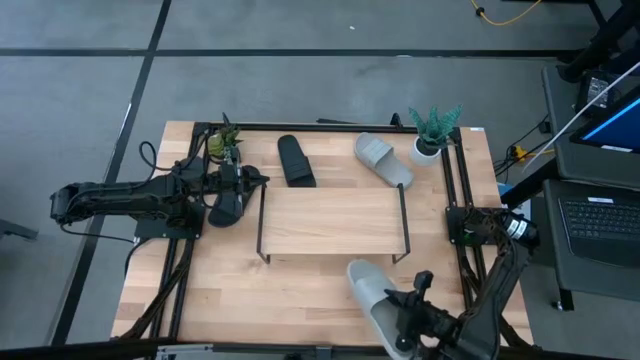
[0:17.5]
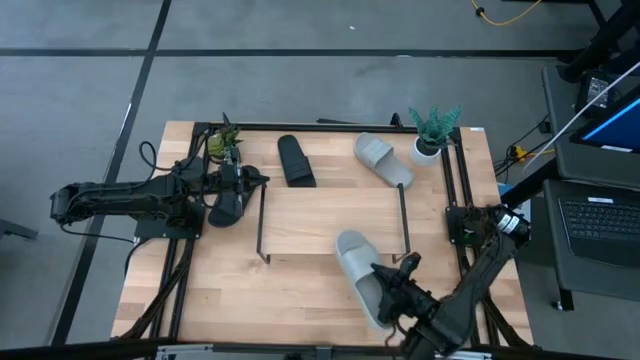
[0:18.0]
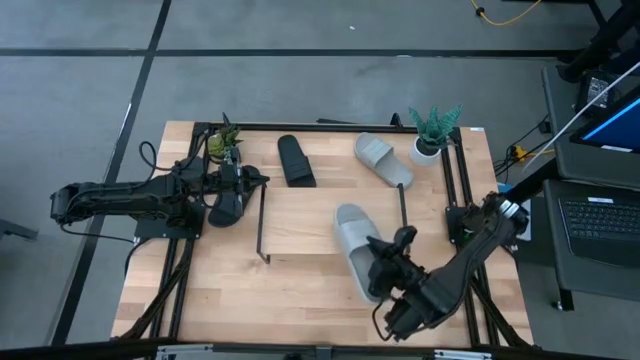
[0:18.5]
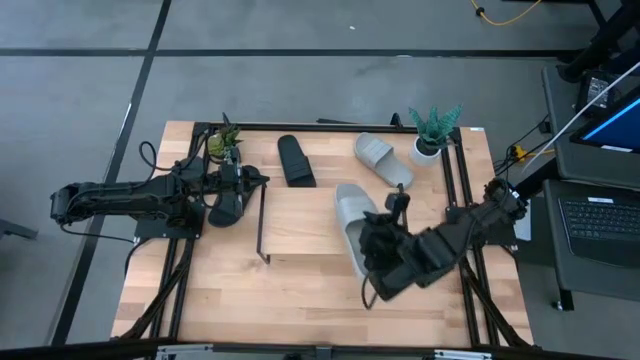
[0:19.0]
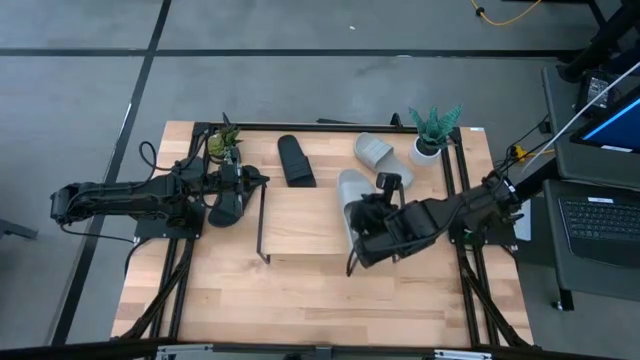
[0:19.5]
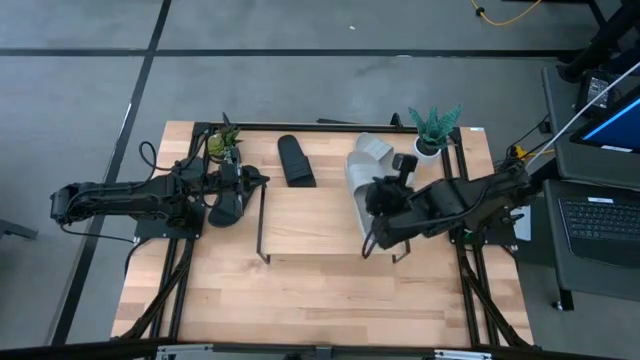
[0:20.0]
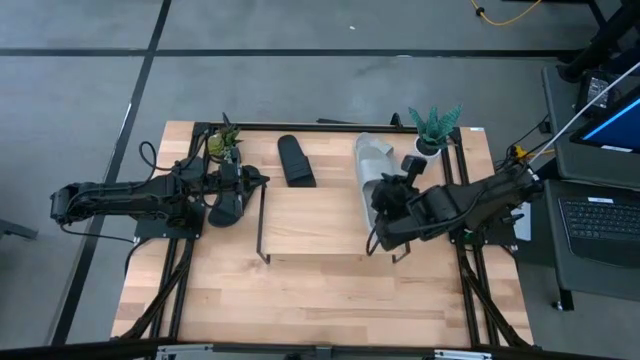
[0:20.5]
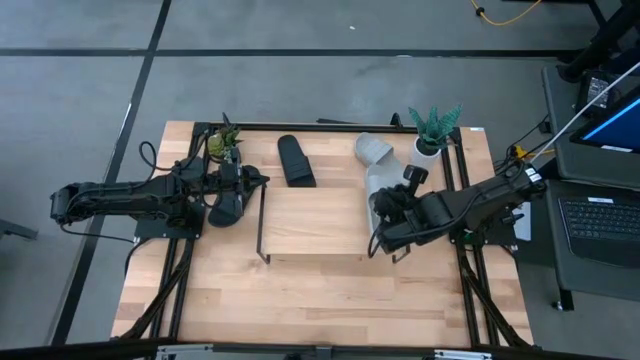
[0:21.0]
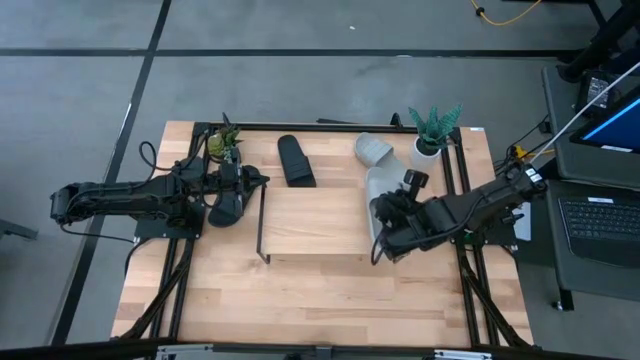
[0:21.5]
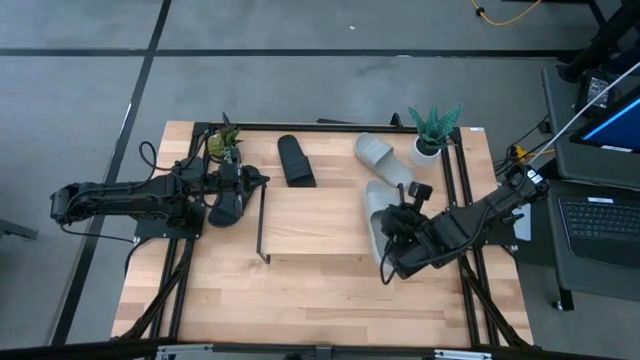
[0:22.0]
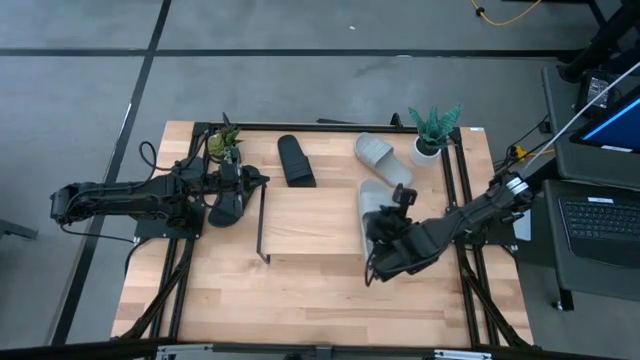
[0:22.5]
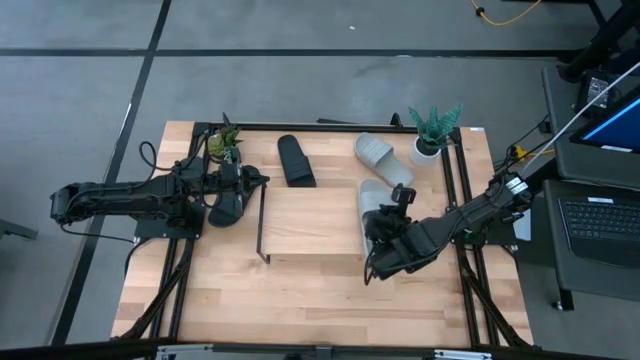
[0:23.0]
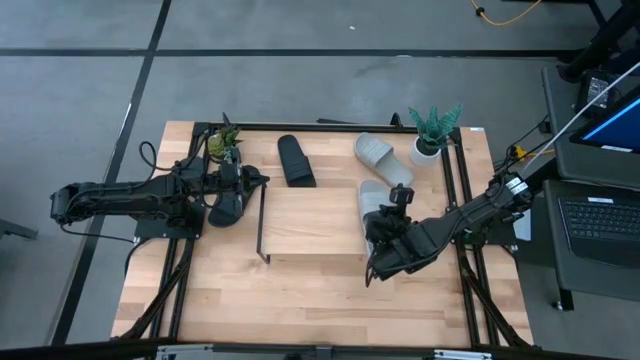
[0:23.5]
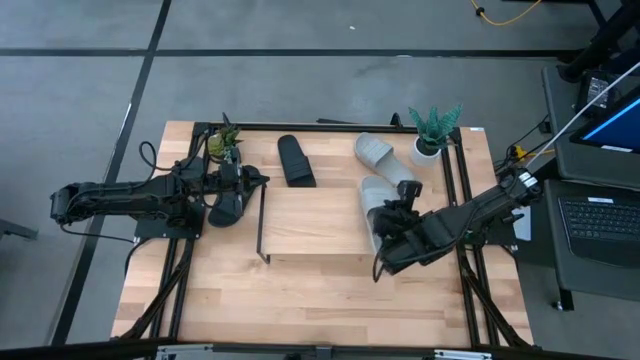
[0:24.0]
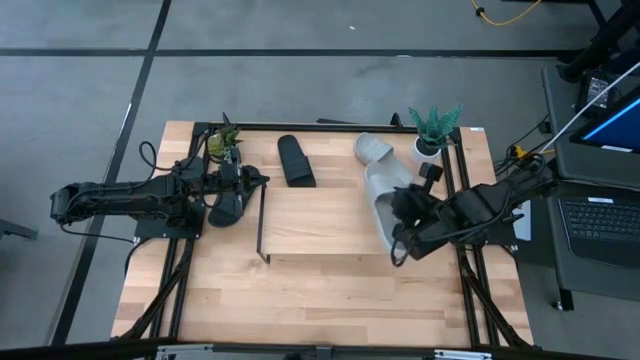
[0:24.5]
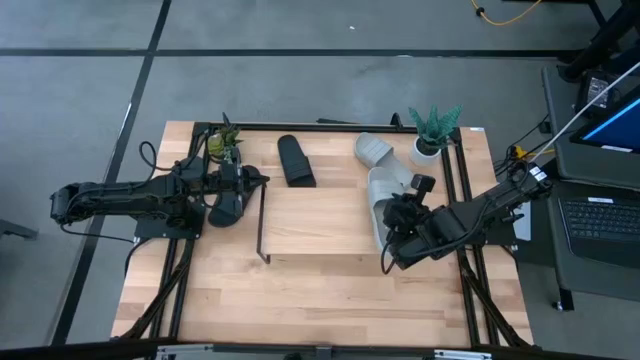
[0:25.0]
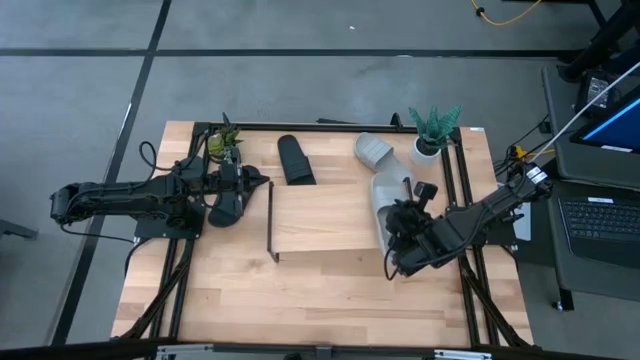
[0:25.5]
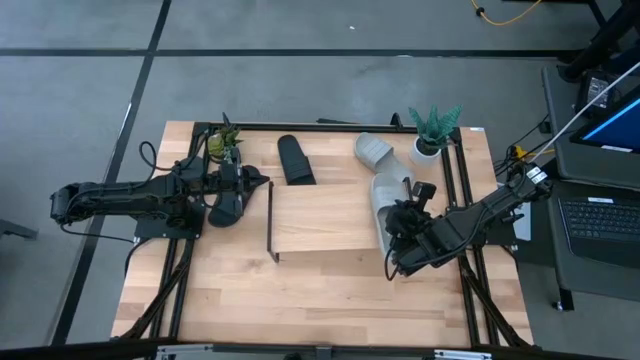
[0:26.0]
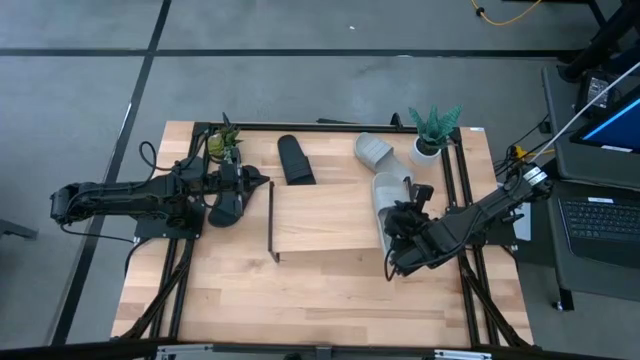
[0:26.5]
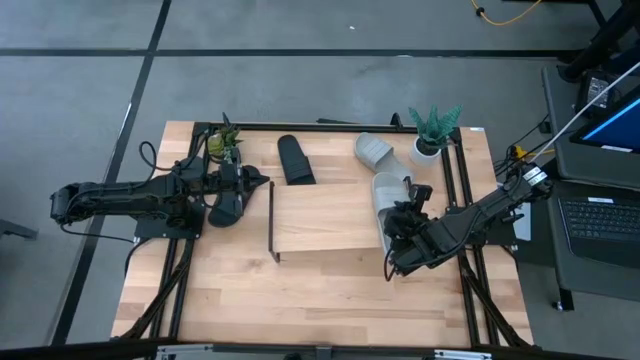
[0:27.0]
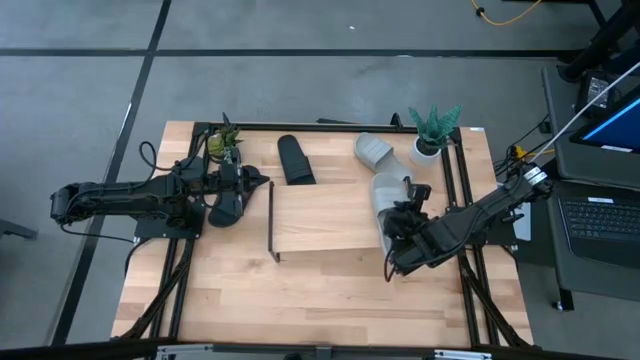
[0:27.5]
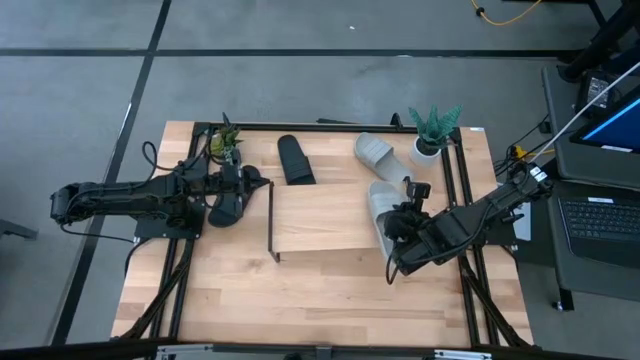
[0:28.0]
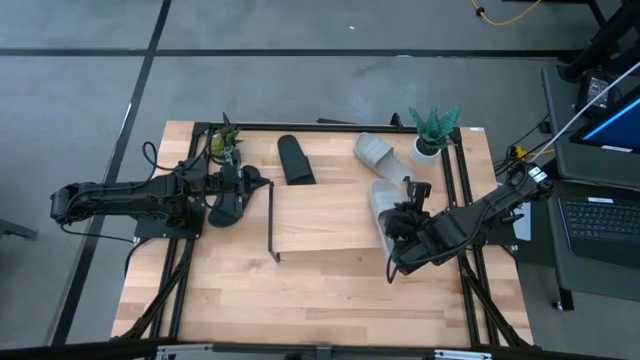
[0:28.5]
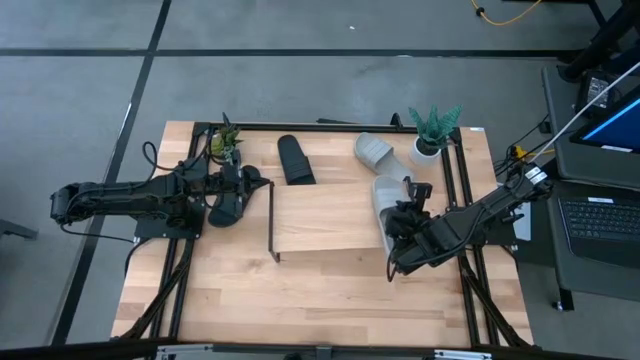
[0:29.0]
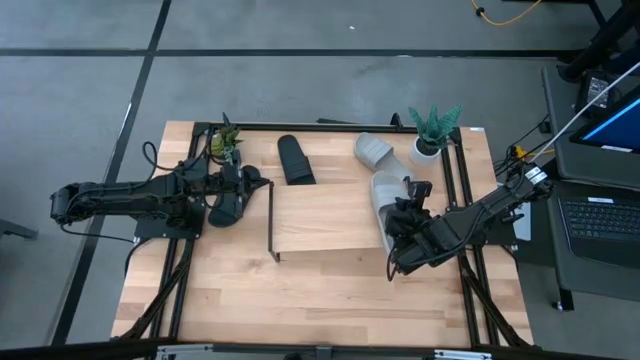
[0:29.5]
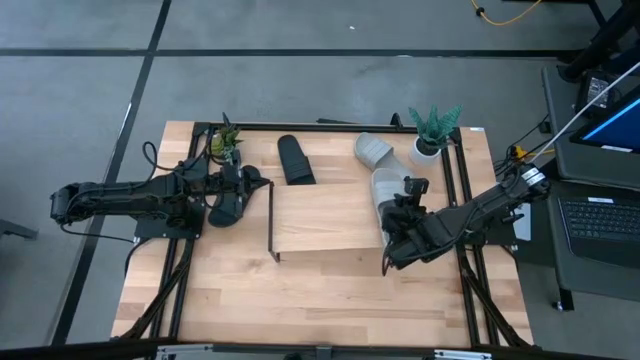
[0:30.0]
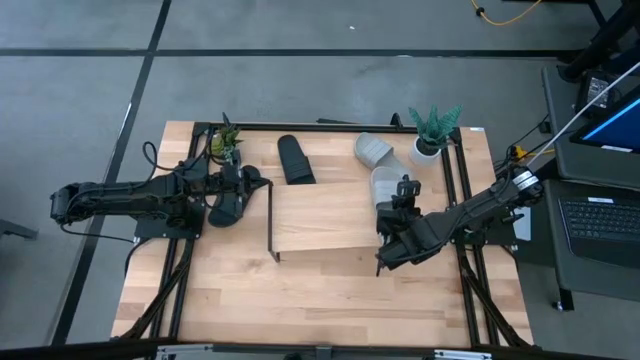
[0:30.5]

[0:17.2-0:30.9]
Task: Pick and place slides into the shelf
Put the bottom gray slide on the shelf

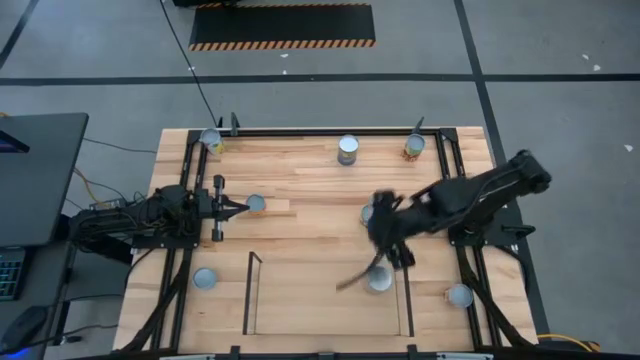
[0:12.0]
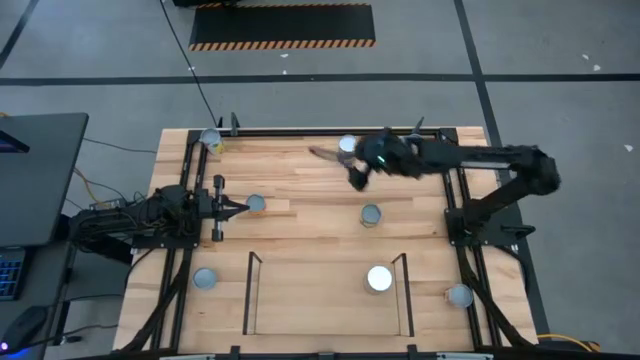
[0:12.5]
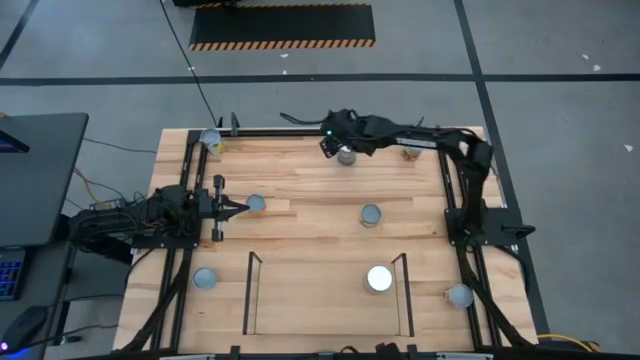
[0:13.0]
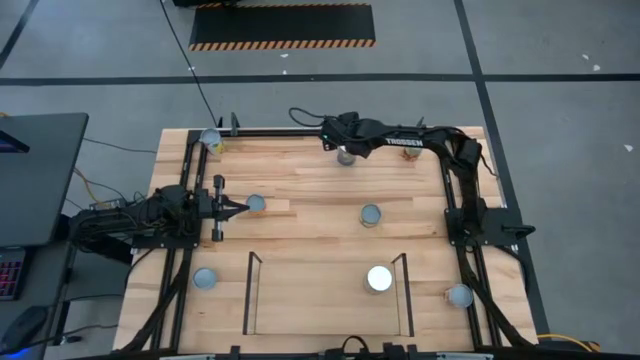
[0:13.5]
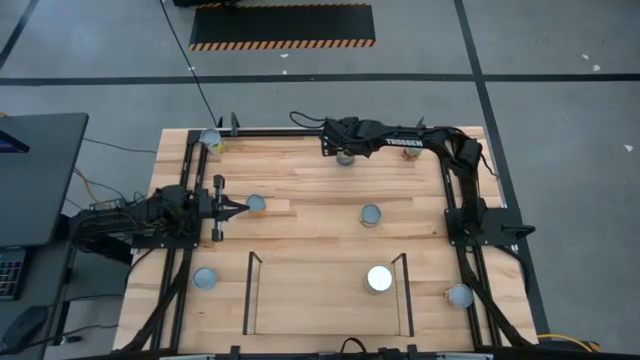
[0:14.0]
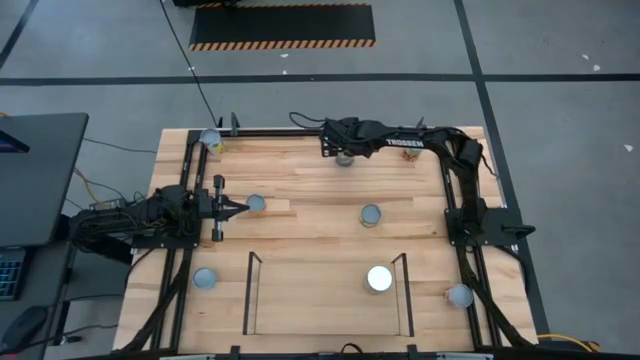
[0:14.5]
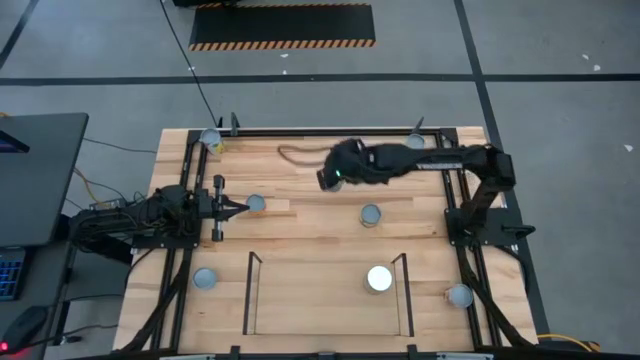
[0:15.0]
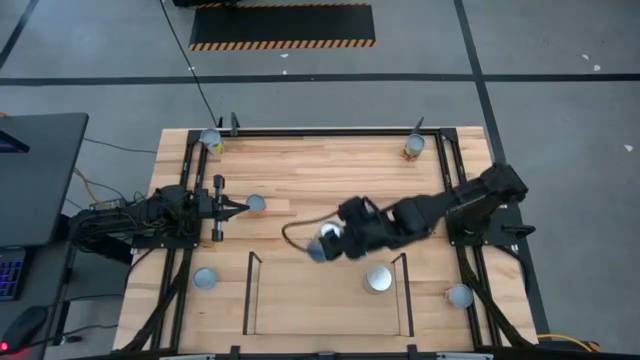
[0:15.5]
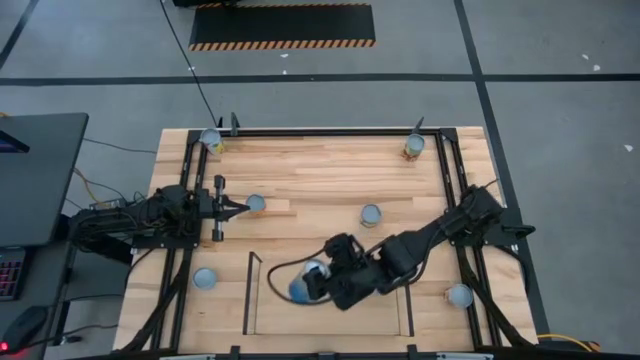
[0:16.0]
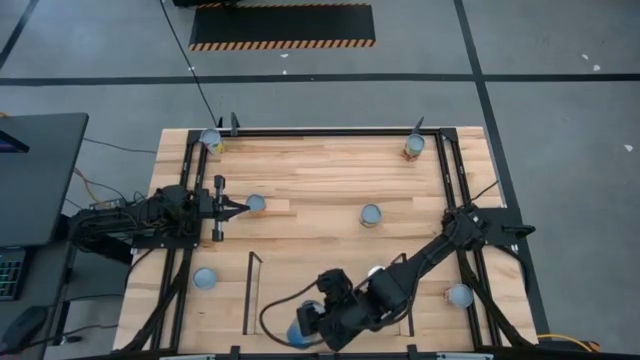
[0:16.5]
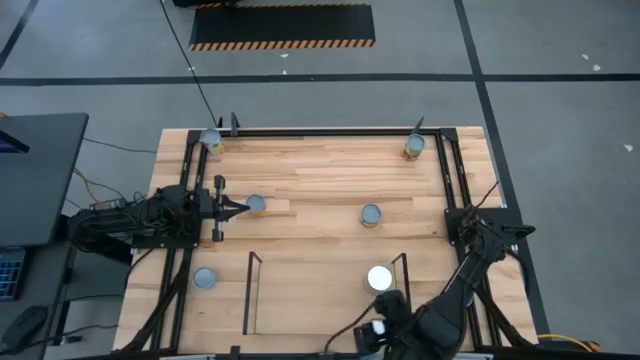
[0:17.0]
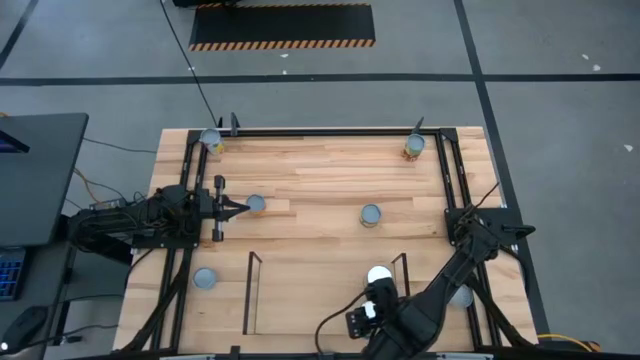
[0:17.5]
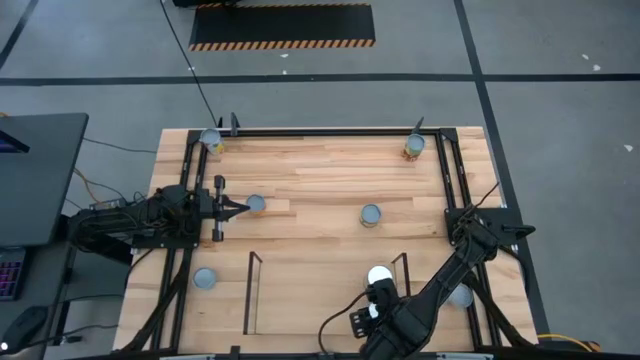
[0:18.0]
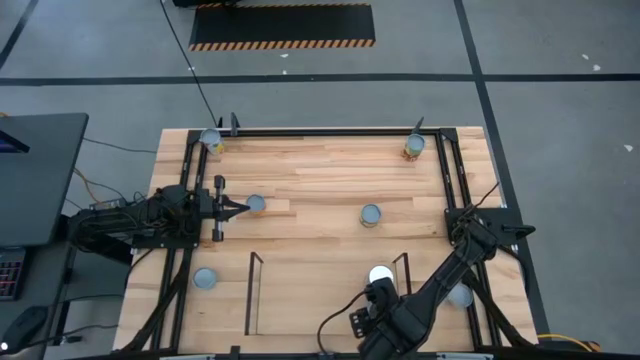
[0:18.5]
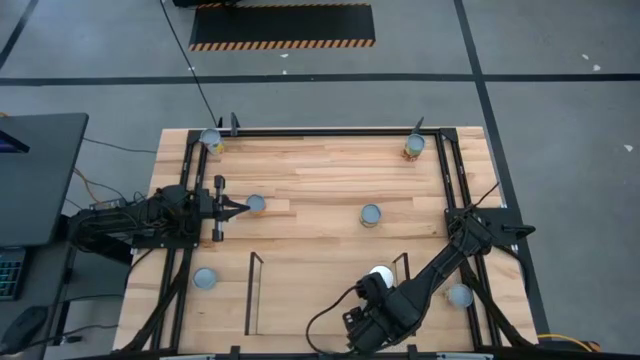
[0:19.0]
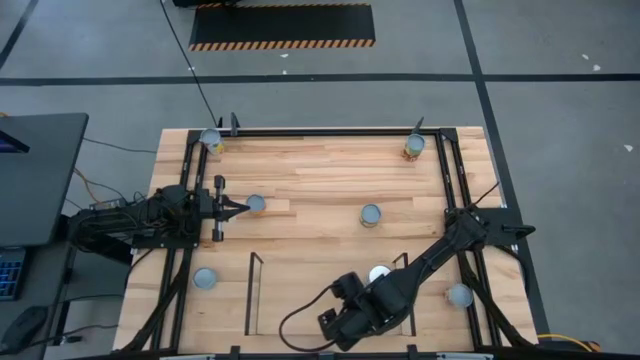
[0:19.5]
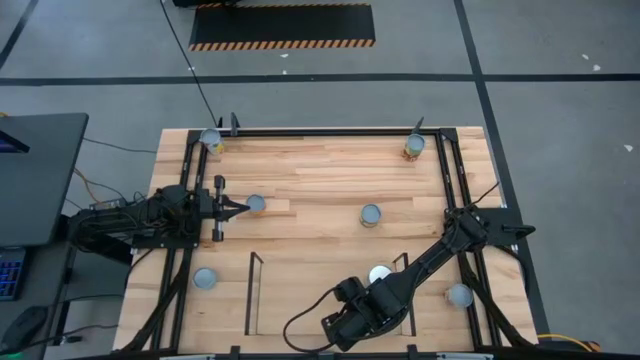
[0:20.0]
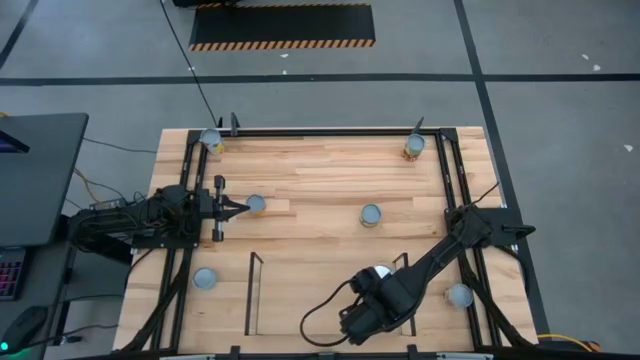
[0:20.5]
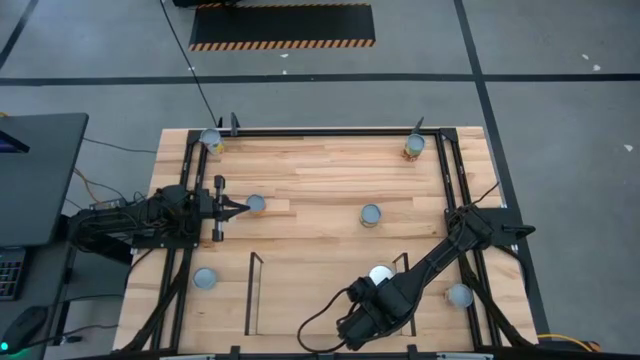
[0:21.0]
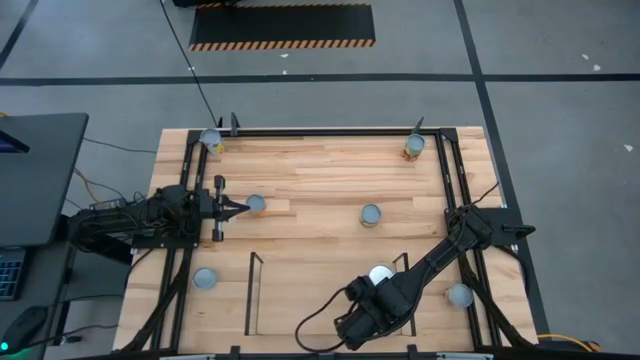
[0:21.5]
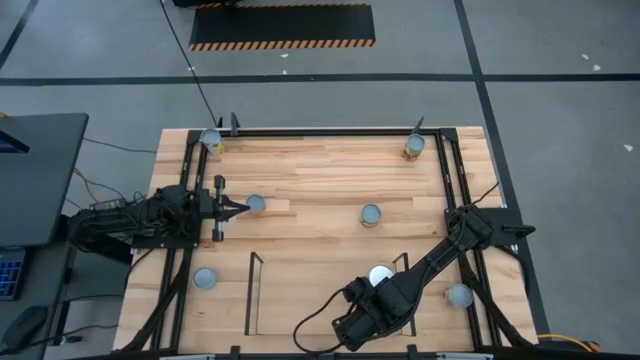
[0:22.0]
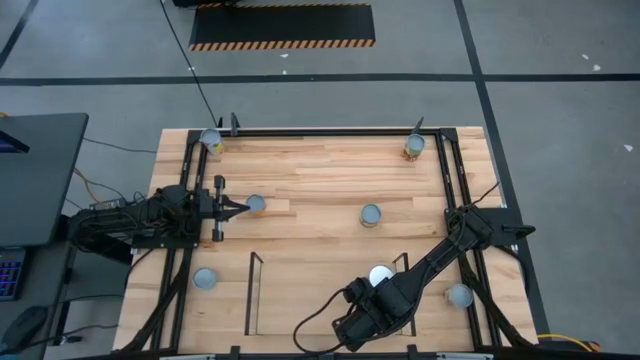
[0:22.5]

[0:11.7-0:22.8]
Task: Pick and place cans onto a shelf
Put the canned peas on the shelf
